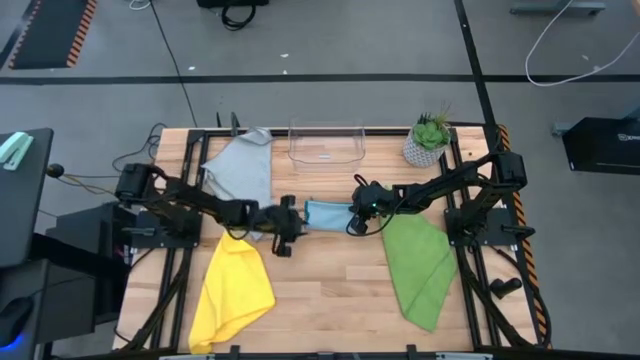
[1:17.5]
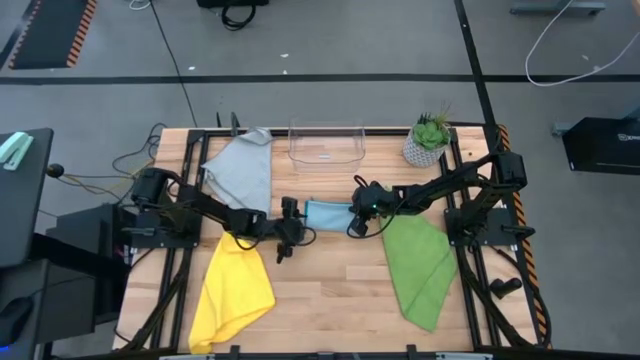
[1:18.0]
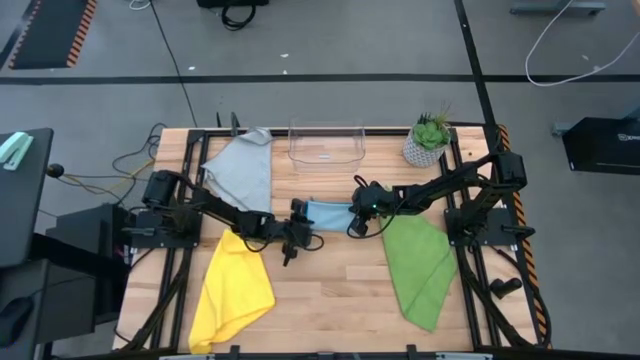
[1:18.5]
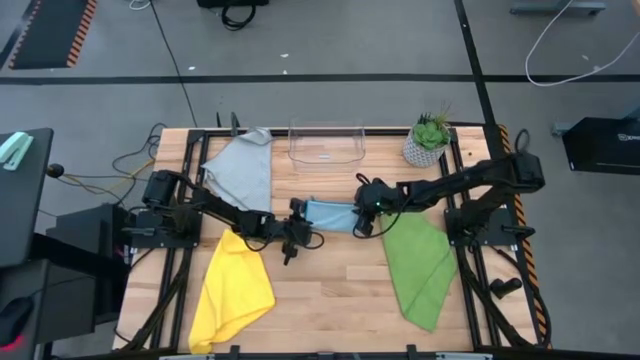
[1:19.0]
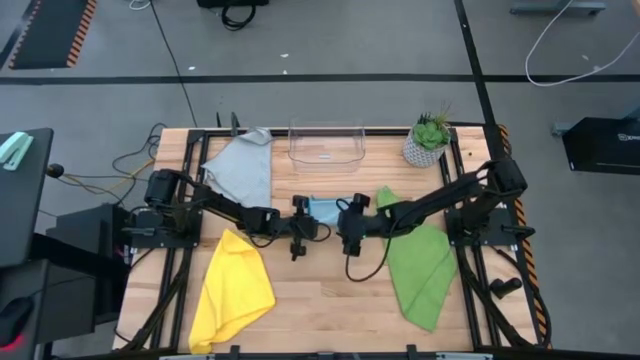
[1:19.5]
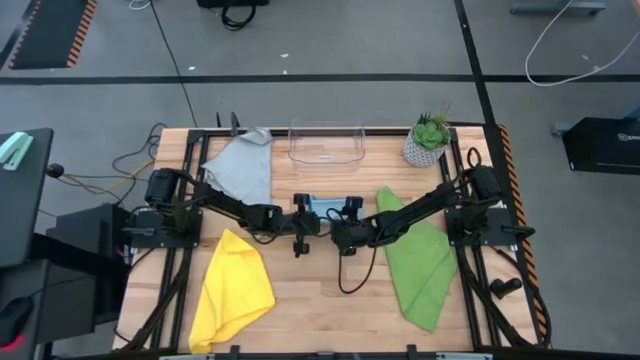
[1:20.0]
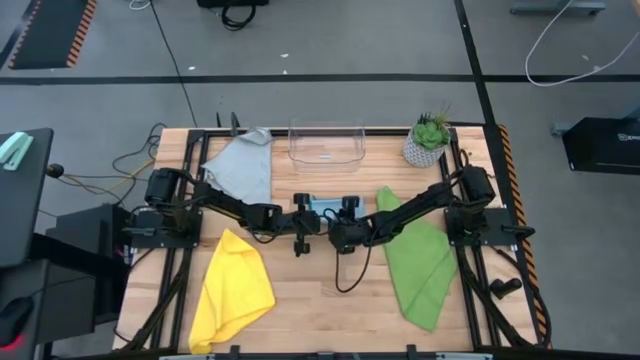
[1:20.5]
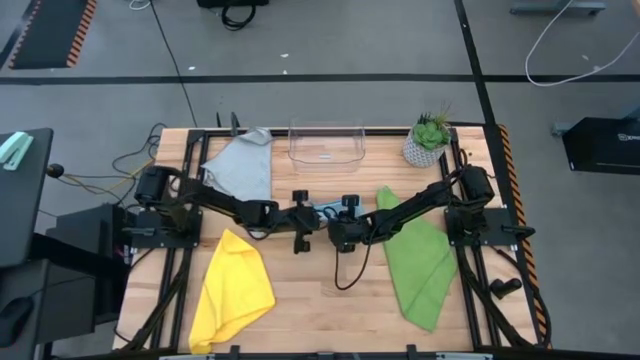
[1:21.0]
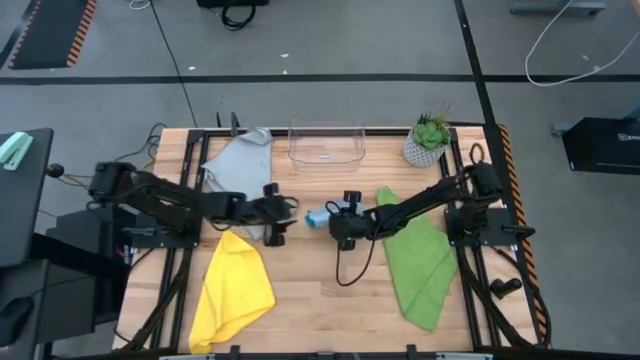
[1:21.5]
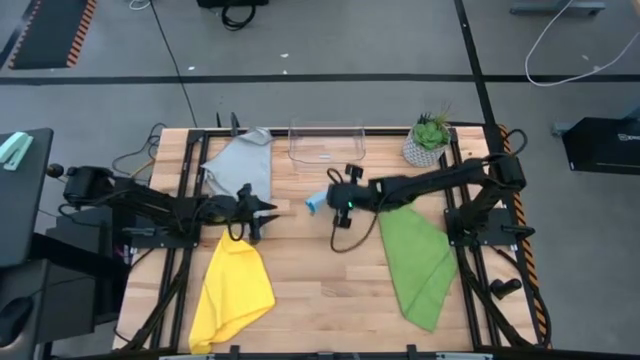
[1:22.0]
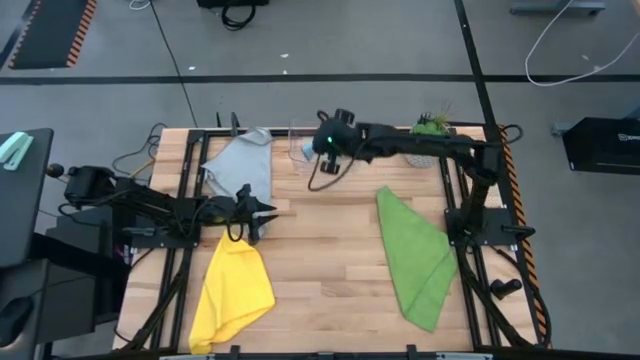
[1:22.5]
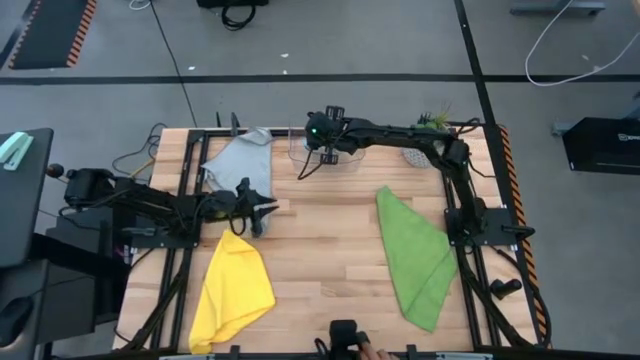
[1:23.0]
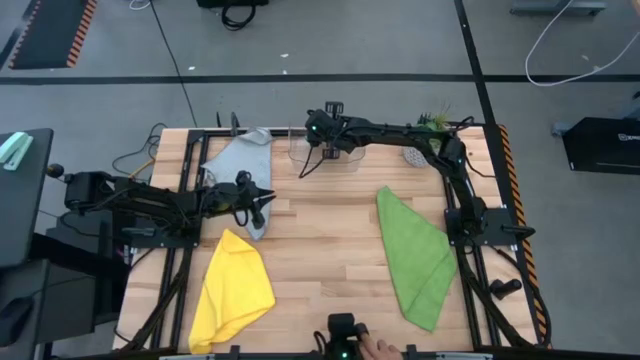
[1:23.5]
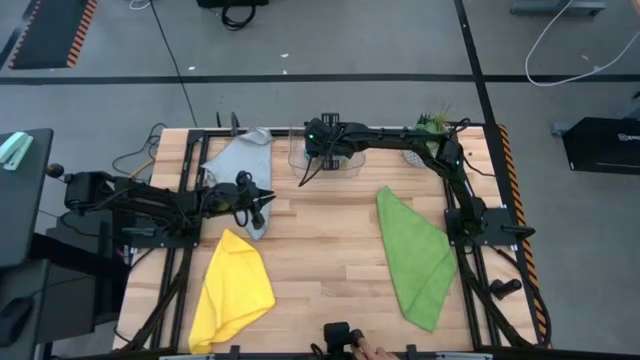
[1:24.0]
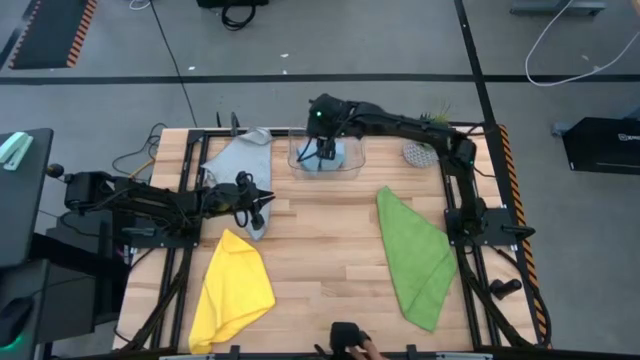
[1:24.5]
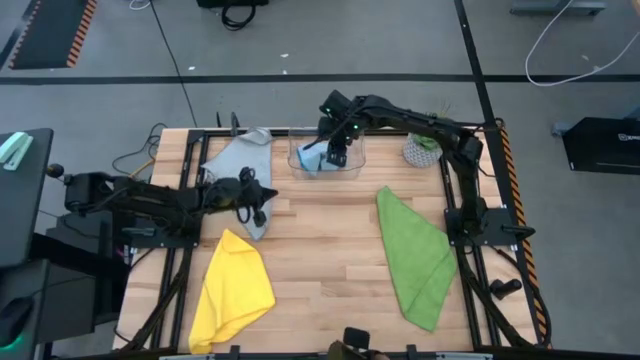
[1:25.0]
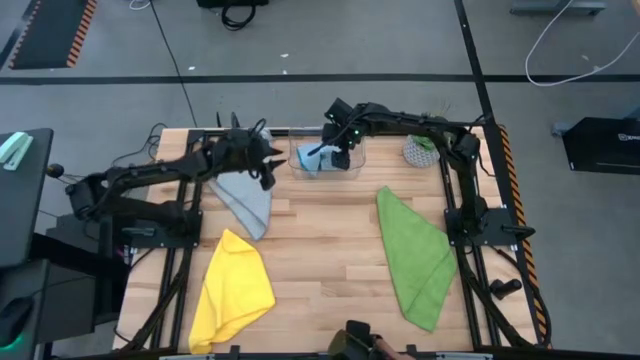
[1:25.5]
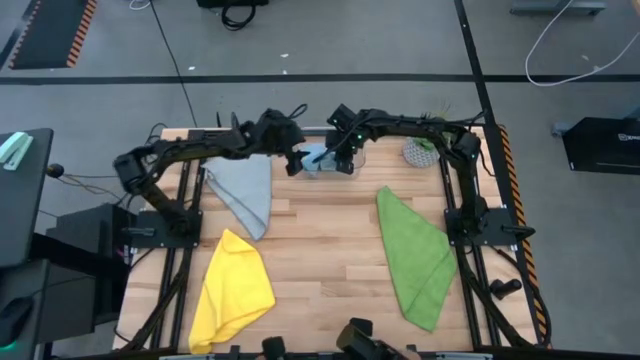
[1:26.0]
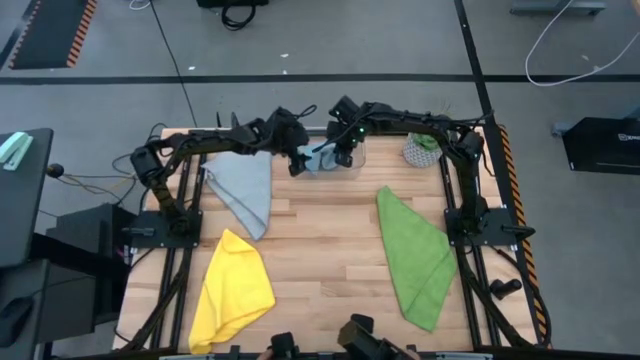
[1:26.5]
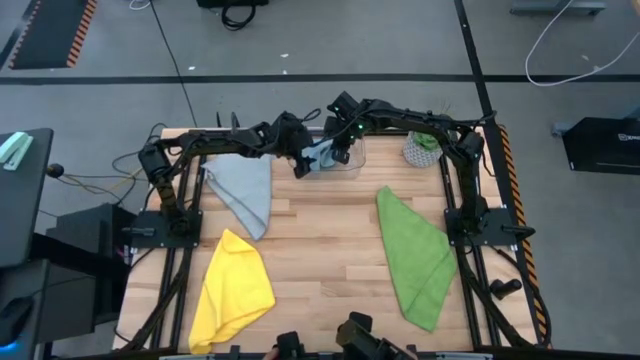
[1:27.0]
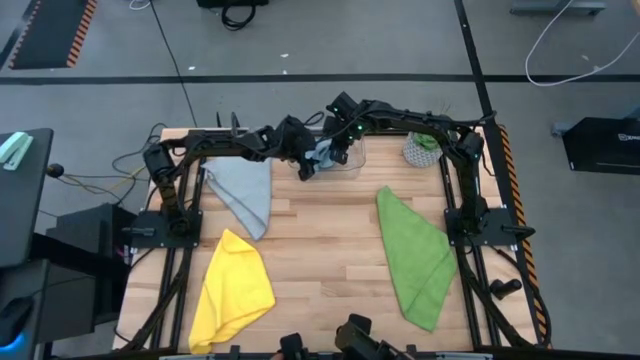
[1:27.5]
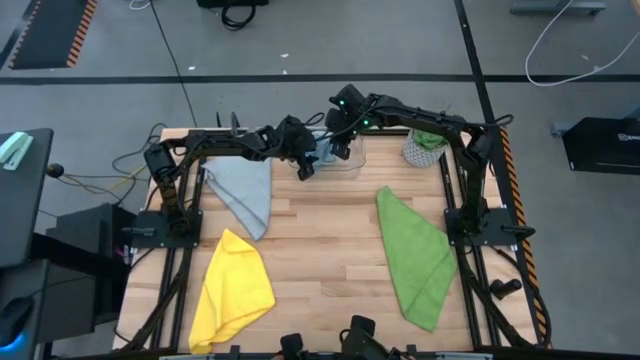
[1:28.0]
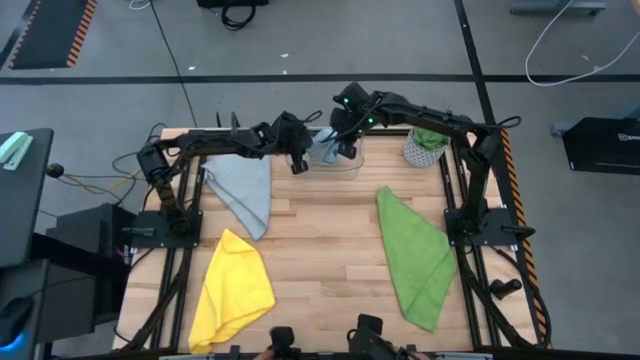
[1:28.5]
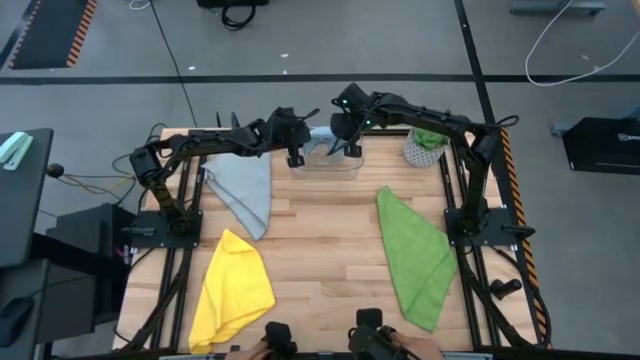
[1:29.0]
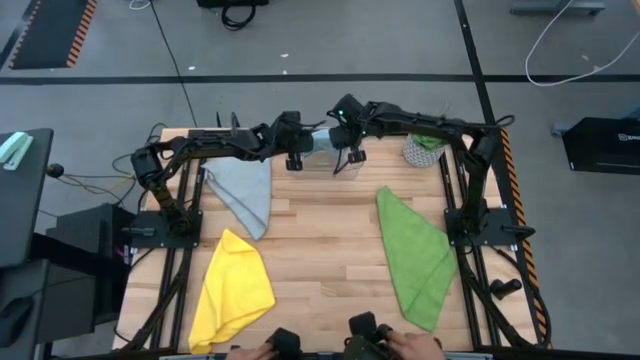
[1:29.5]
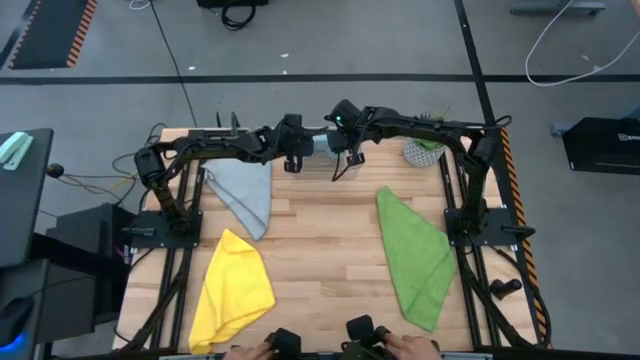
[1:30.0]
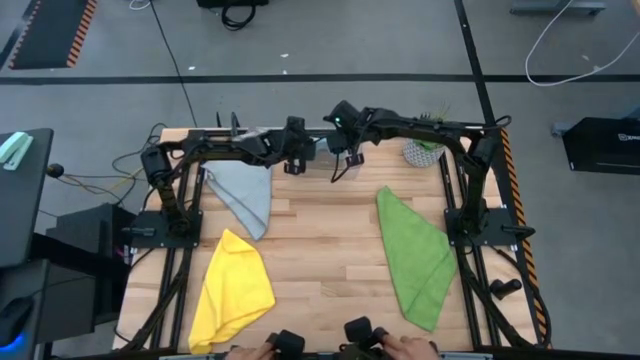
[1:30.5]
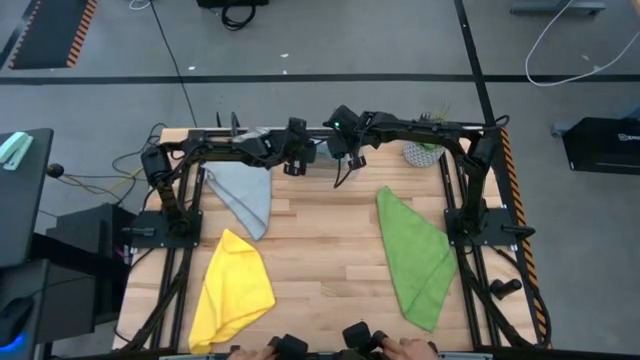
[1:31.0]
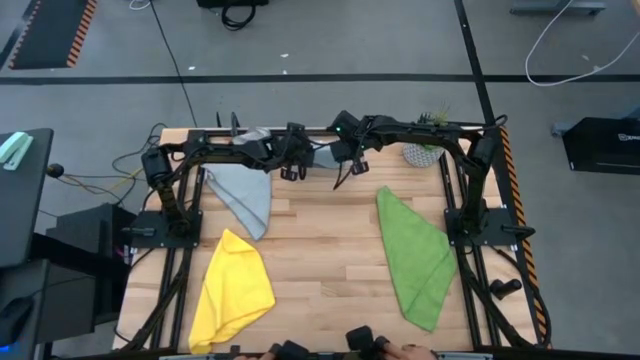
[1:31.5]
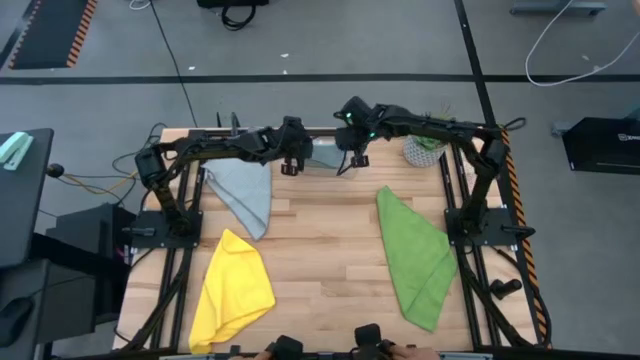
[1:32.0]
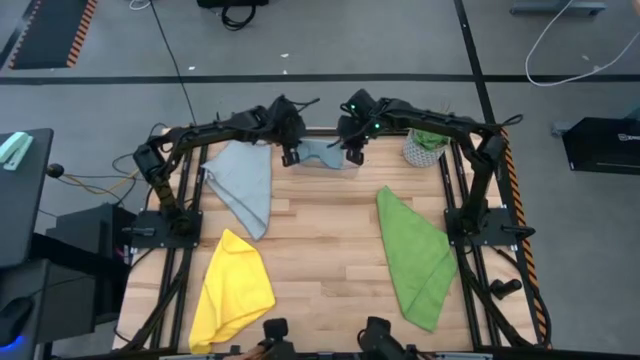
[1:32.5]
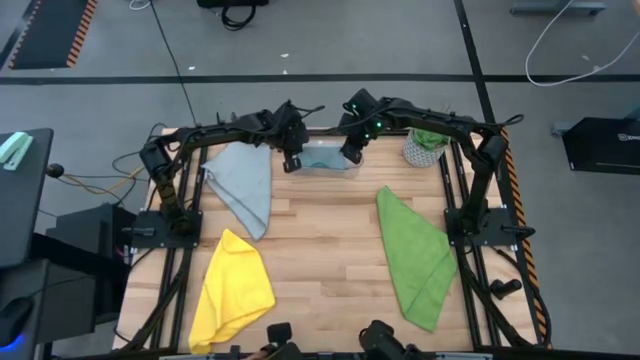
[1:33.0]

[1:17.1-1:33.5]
Task: Fold microfiber towels
Put the folded blue microfiber towel into the transparent bin
